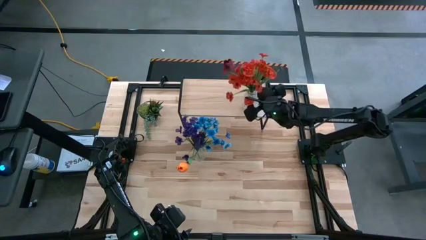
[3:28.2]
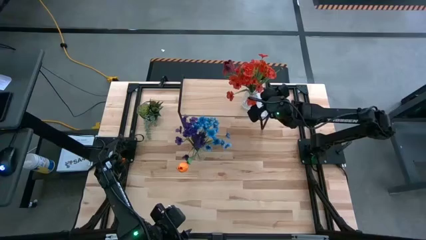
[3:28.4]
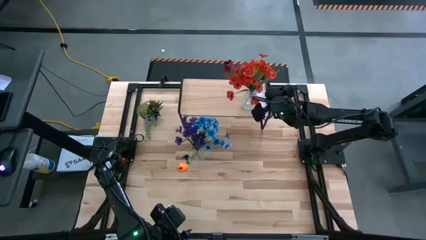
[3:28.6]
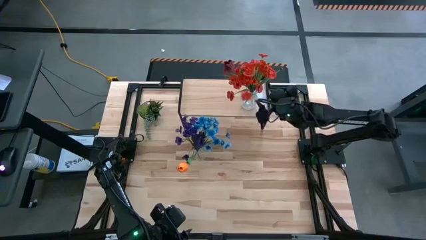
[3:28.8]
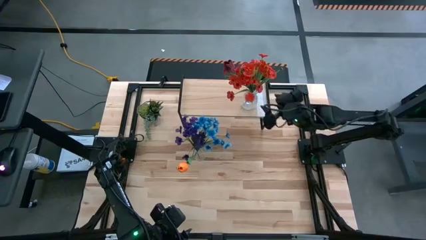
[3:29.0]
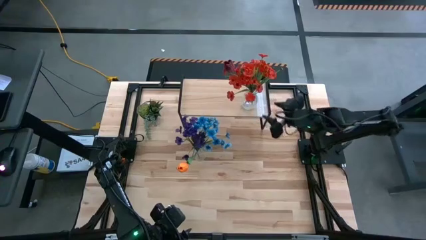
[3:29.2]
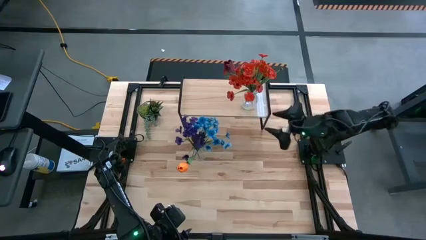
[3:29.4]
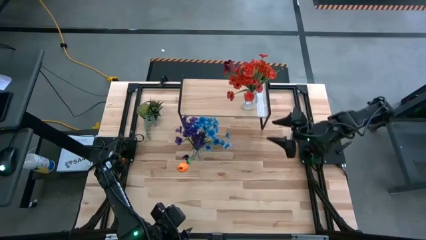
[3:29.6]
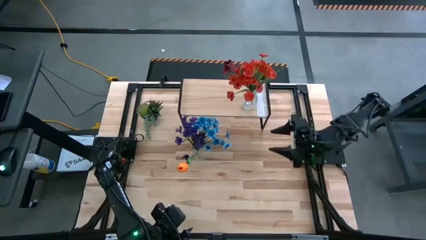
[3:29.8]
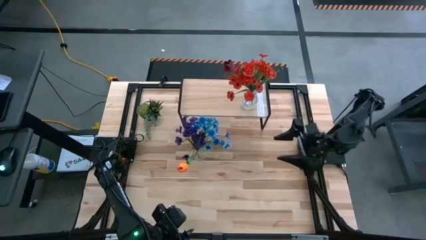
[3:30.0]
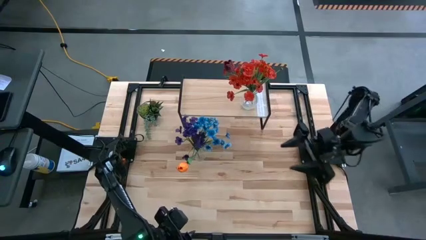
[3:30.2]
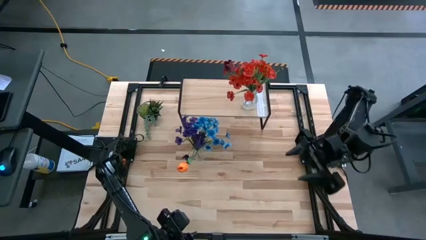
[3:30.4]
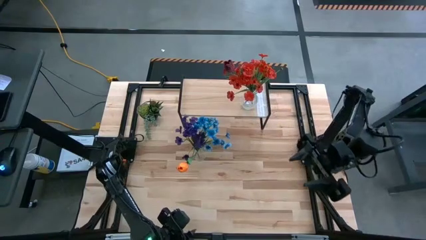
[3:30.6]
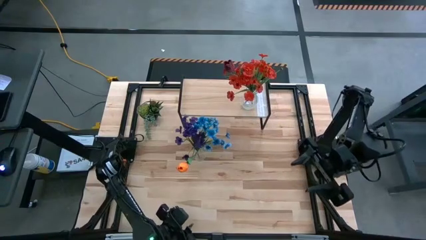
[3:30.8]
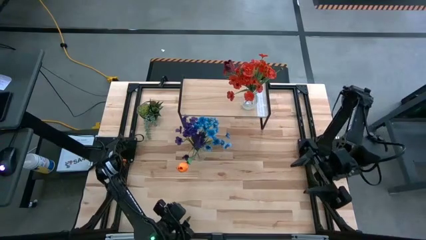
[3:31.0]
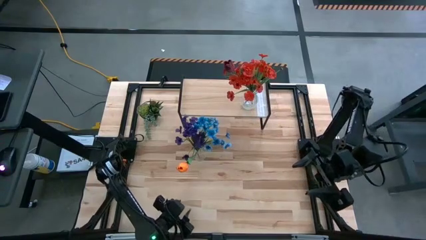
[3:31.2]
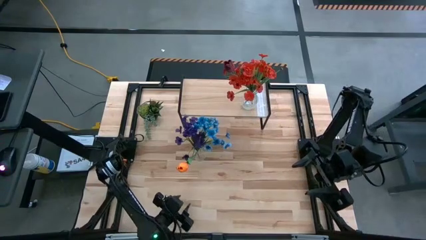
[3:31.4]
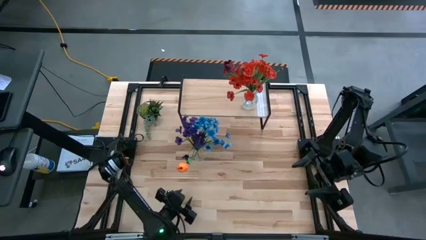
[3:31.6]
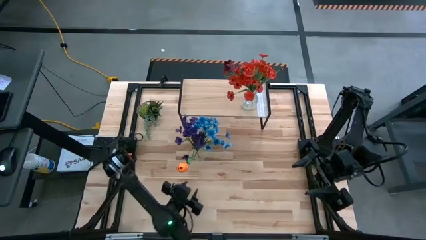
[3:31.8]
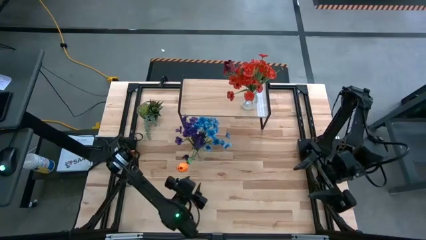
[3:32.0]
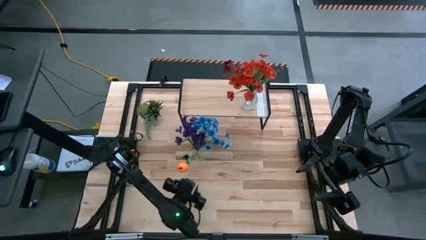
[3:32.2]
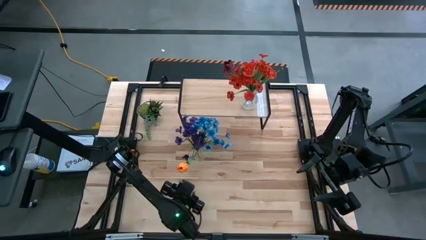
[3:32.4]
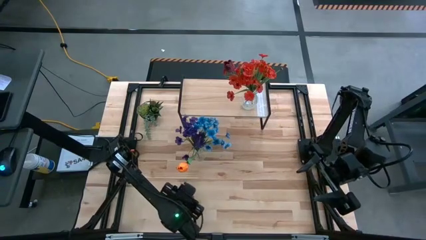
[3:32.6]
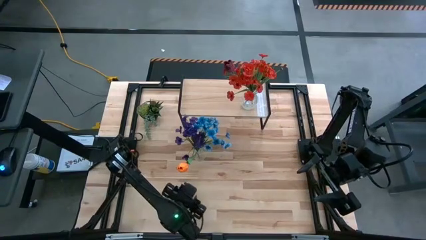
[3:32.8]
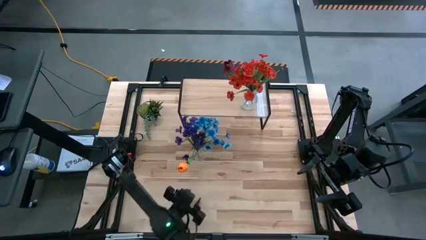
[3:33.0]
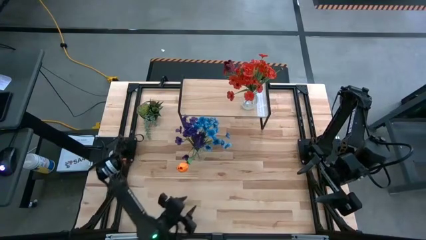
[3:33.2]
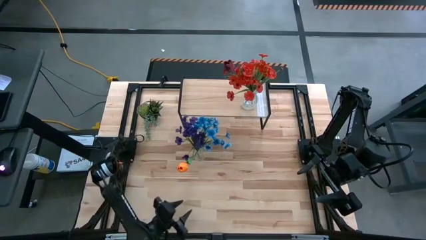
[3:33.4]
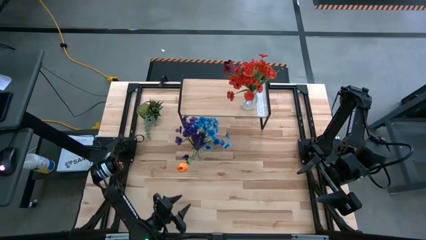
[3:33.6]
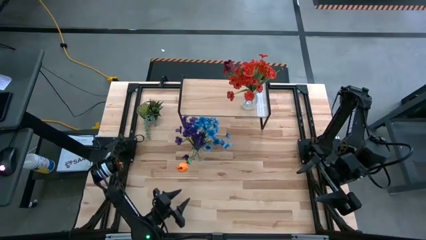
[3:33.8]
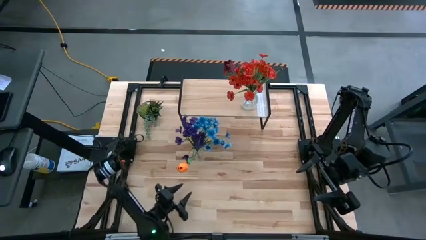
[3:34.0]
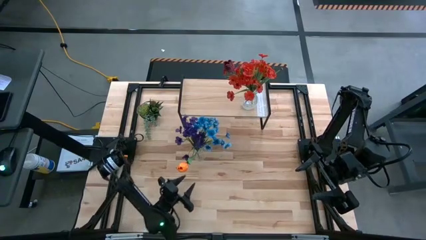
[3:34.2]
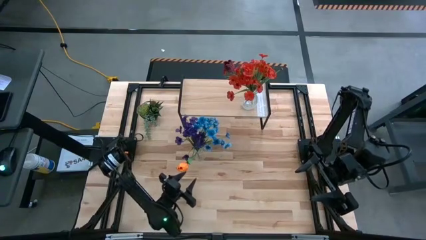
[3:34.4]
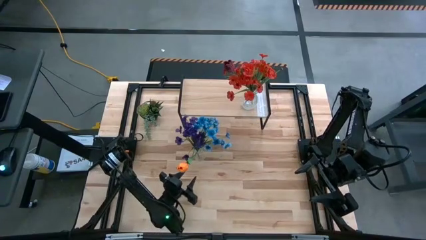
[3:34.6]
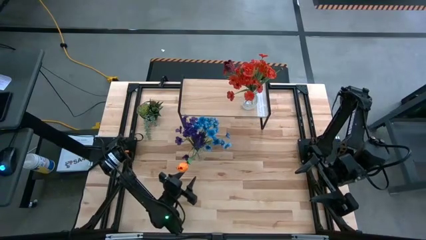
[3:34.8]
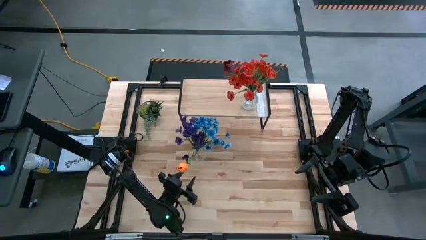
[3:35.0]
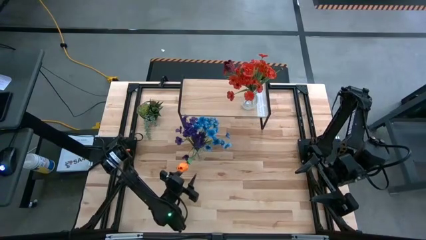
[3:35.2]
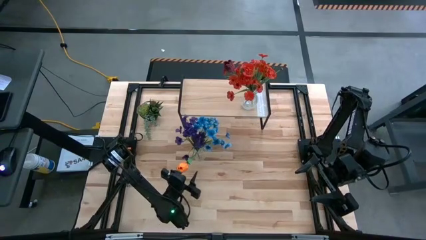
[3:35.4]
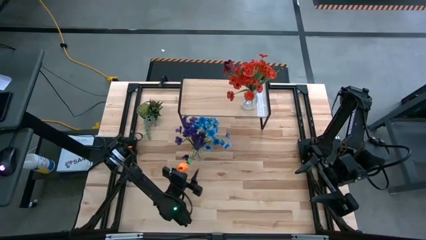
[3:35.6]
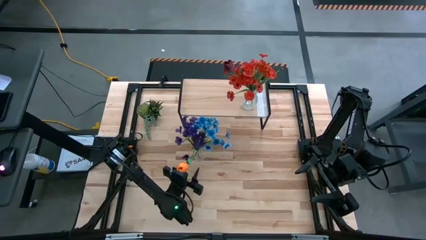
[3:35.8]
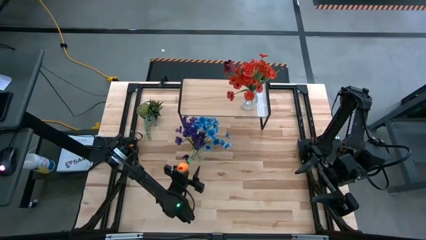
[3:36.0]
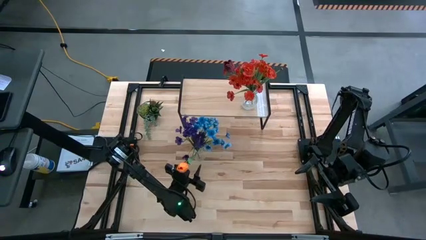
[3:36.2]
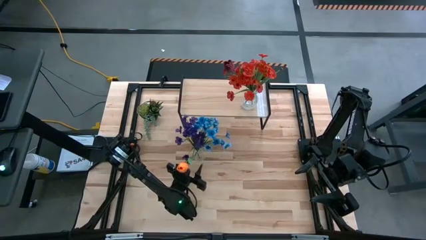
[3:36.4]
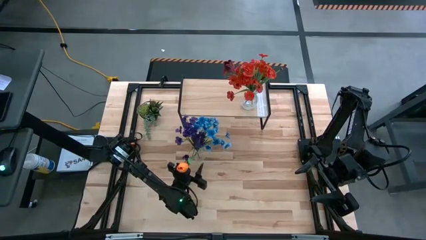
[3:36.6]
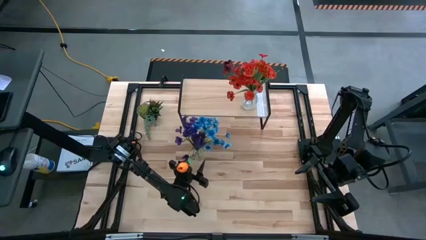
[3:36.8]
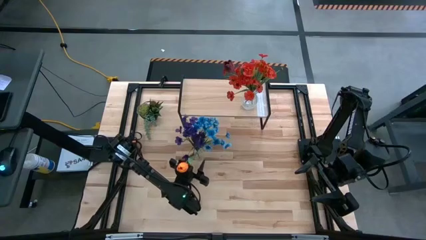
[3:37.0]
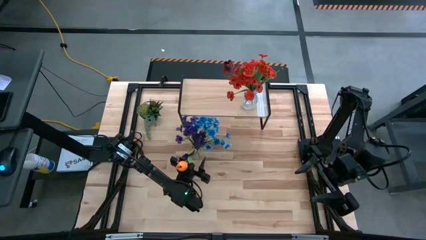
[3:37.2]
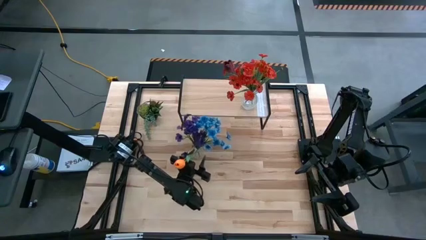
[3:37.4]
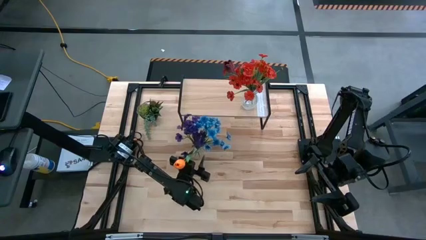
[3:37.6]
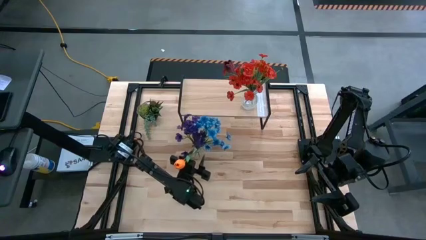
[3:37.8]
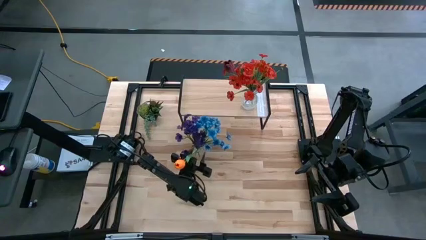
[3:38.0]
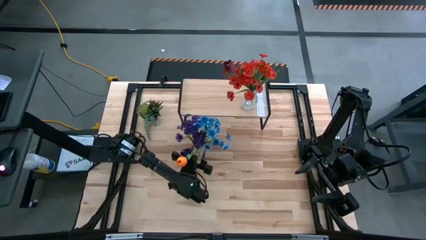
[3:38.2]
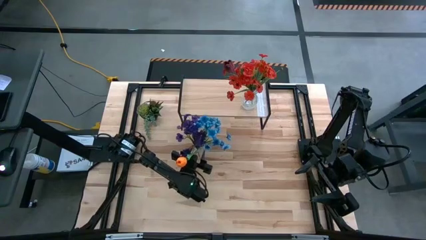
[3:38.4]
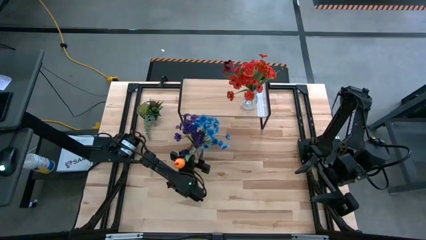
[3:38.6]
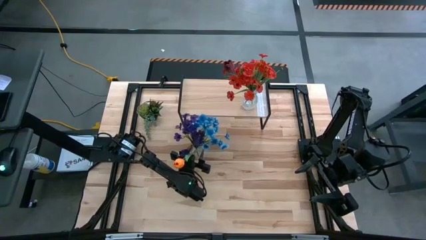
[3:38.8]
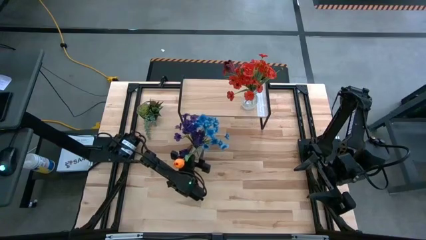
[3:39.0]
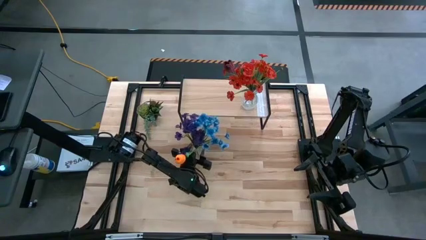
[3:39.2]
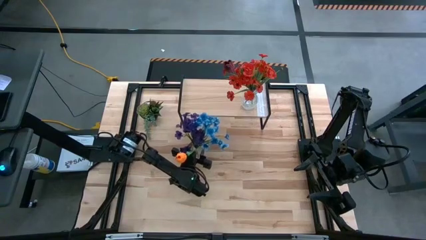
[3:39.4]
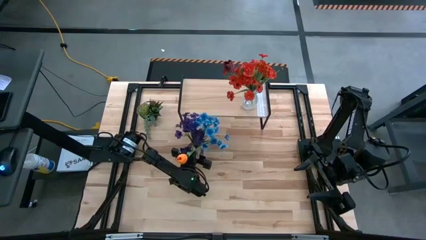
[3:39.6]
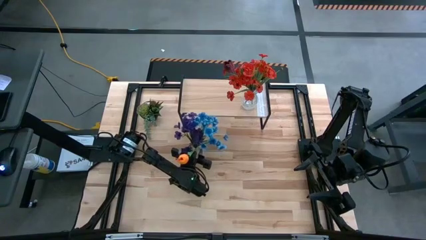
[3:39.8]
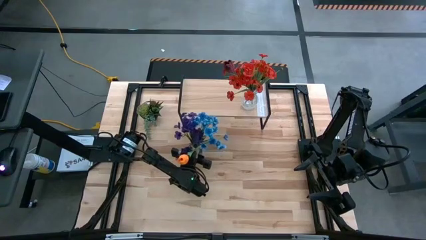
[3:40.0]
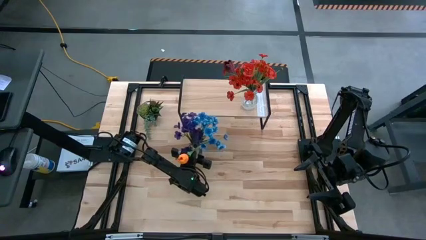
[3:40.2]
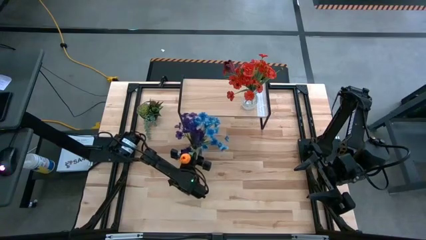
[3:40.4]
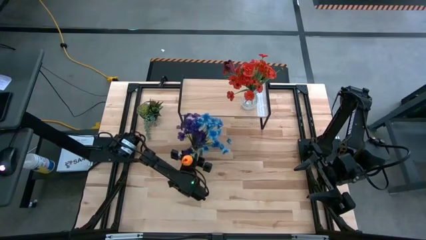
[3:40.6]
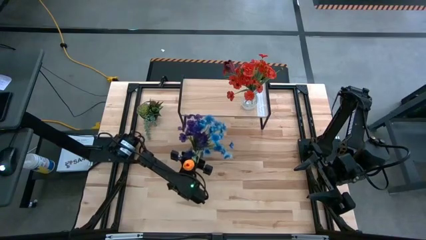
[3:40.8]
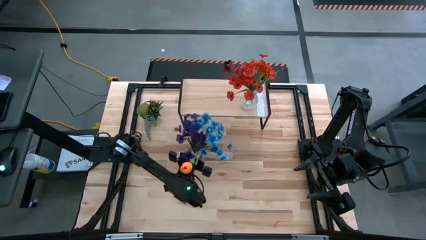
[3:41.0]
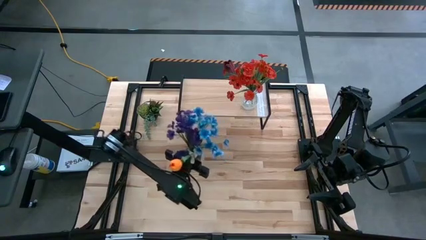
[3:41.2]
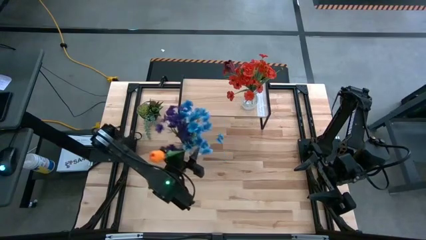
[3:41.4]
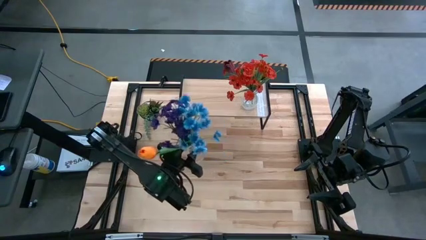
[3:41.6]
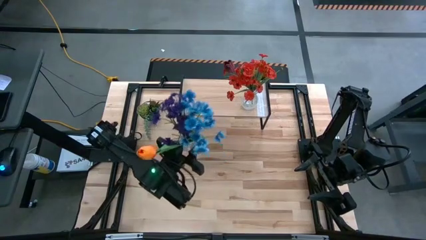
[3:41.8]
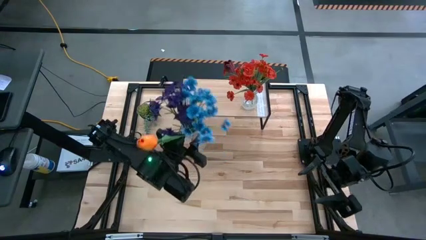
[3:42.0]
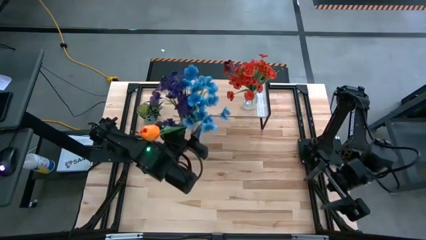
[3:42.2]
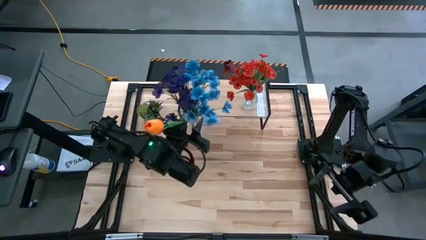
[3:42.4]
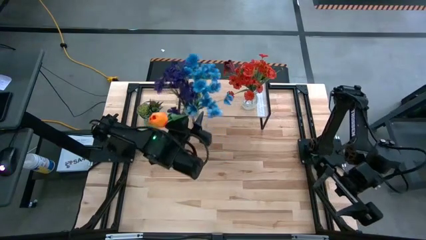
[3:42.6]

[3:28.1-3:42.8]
Task: Pick and place flowers into a vace then onto a shelf
Put the transparent crystal vase with flowers on the shelf

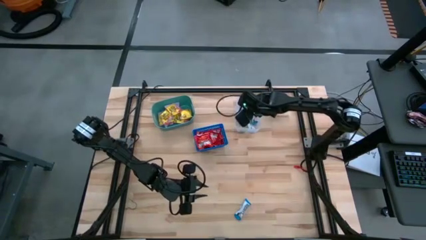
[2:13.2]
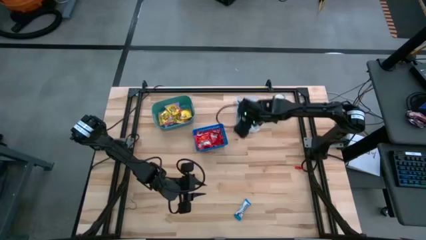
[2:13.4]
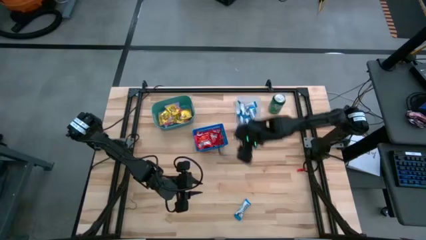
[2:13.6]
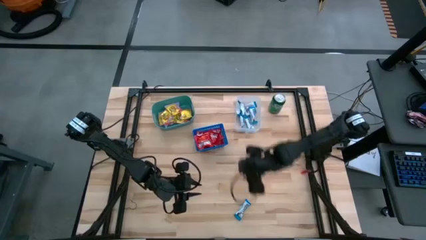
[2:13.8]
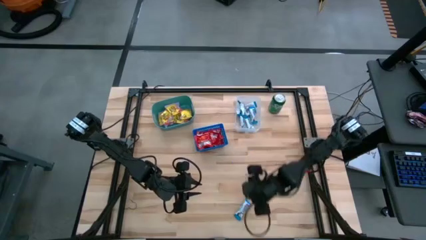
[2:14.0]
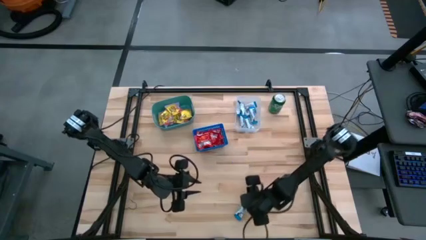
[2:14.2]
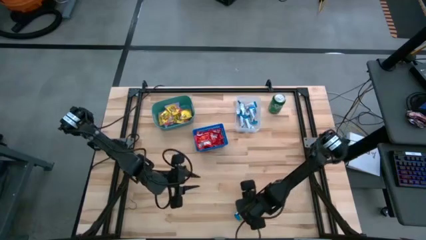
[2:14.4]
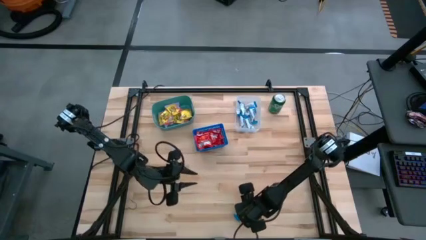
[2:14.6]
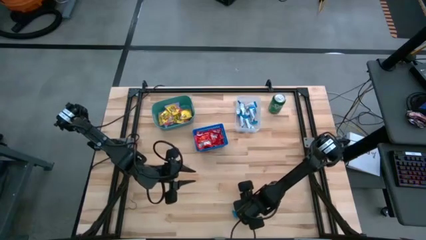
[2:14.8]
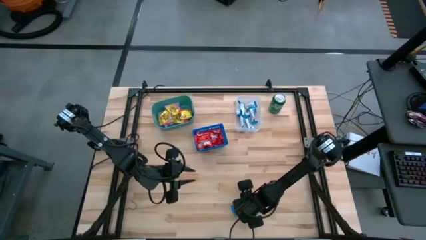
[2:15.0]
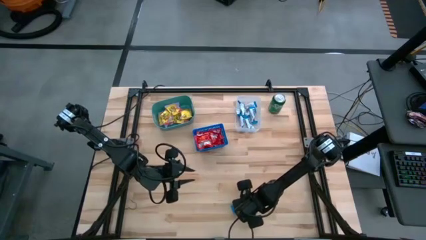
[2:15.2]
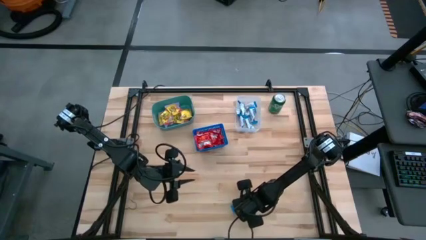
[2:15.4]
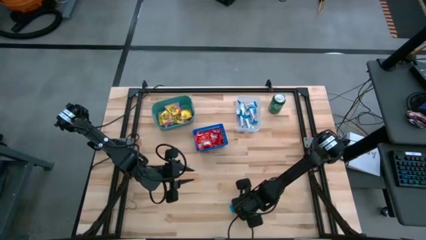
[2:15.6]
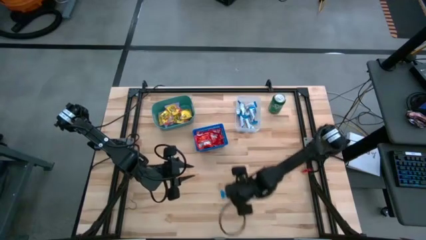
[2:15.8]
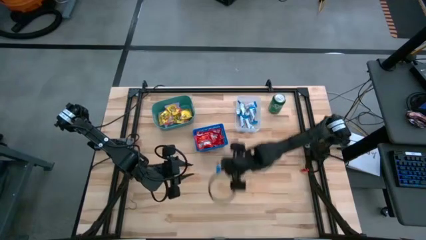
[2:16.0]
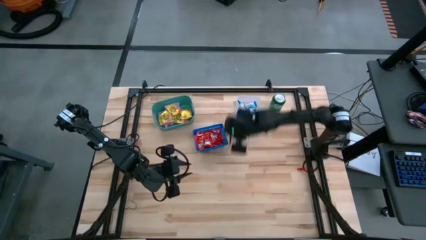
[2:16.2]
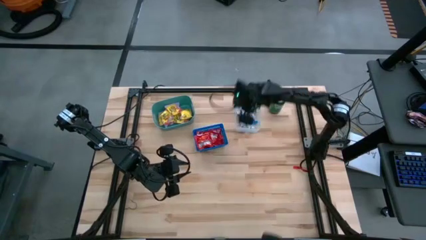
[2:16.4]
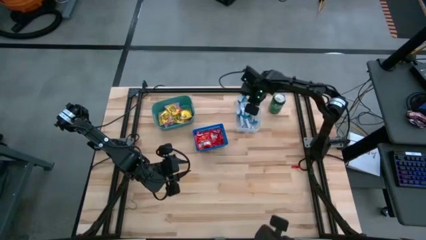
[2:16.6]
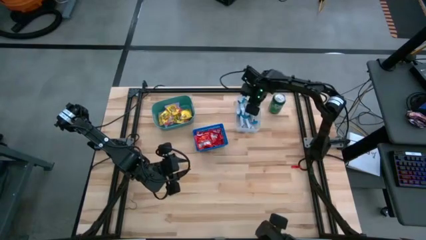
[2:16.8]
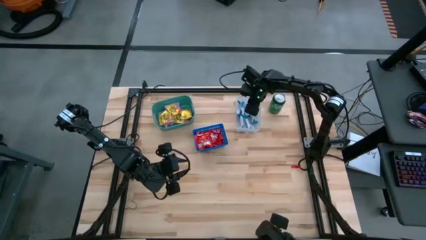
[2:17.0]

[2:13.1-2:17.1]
Task: Sort candy
Put the hersheys bar into the transparent bin
